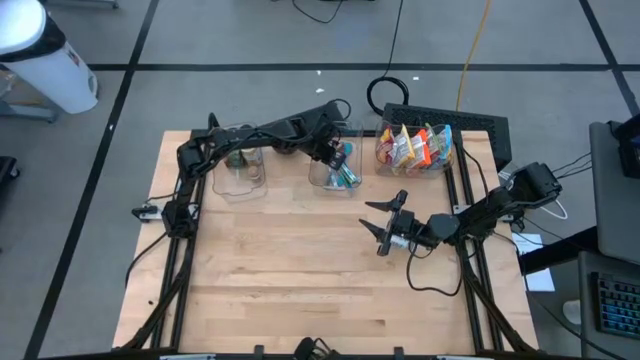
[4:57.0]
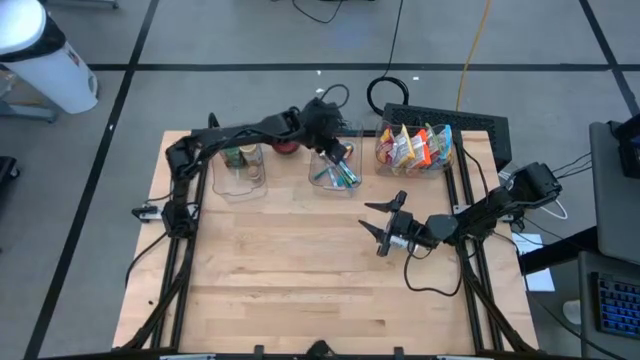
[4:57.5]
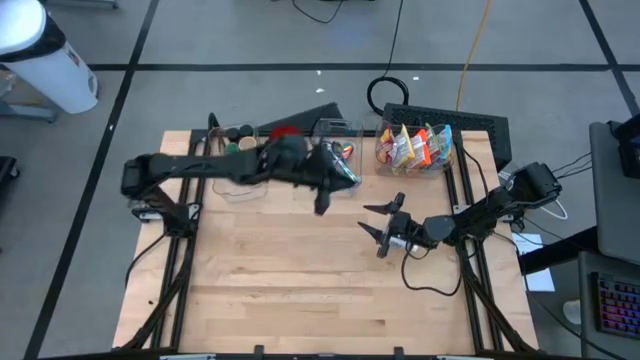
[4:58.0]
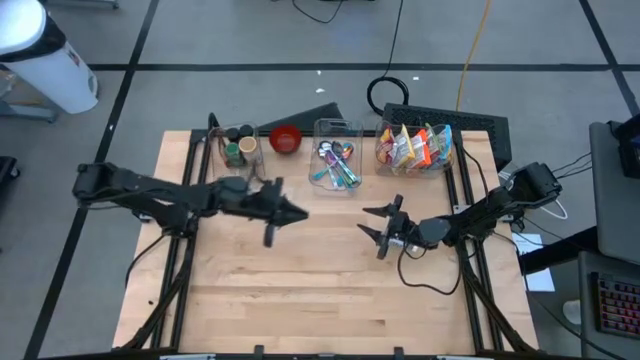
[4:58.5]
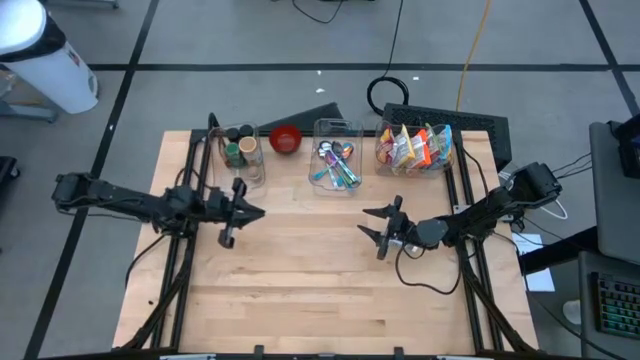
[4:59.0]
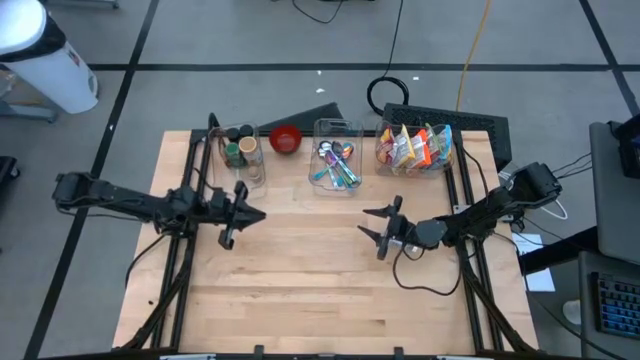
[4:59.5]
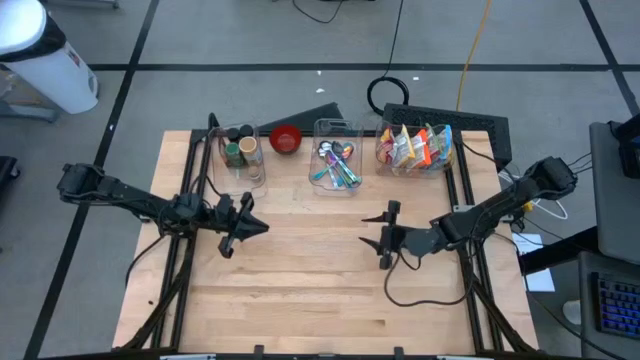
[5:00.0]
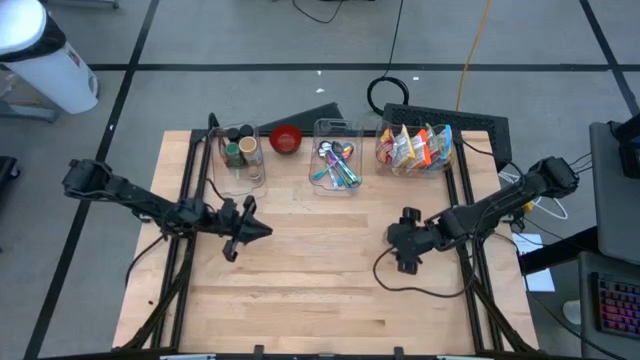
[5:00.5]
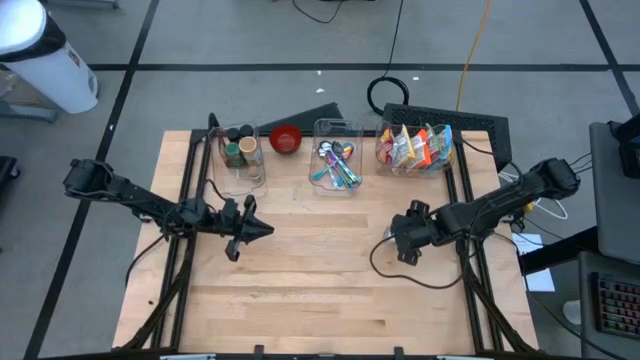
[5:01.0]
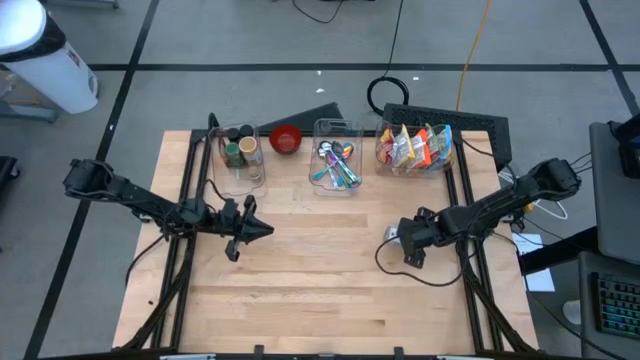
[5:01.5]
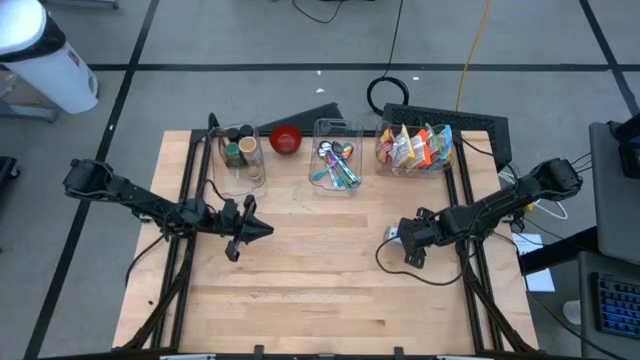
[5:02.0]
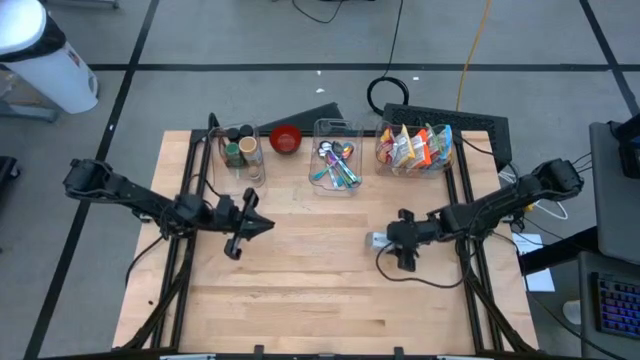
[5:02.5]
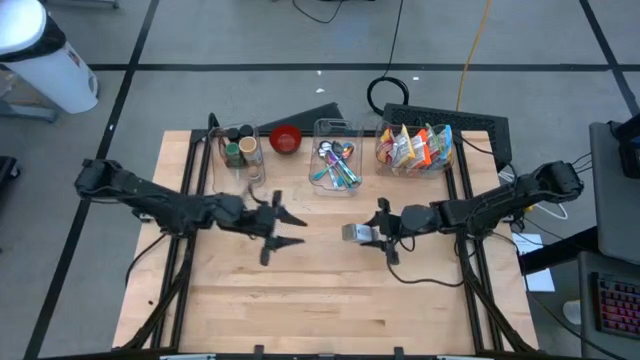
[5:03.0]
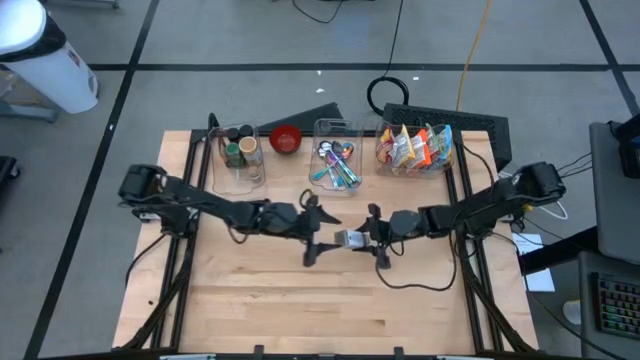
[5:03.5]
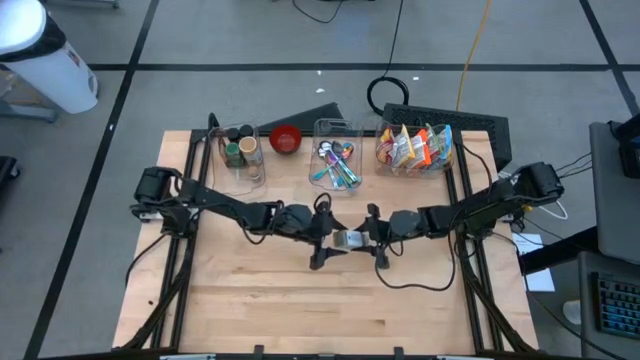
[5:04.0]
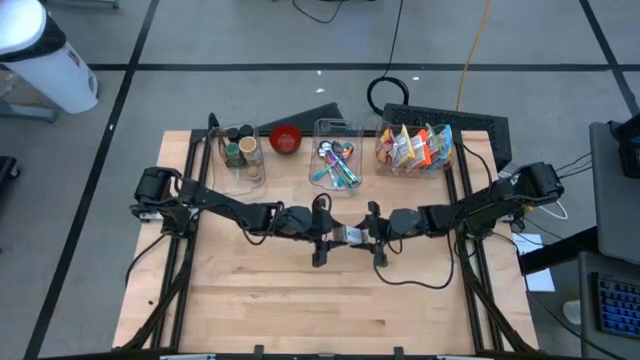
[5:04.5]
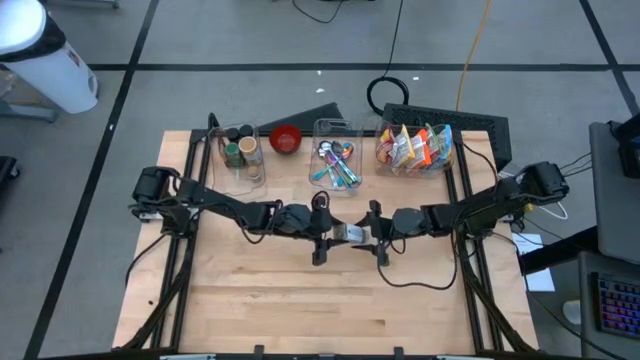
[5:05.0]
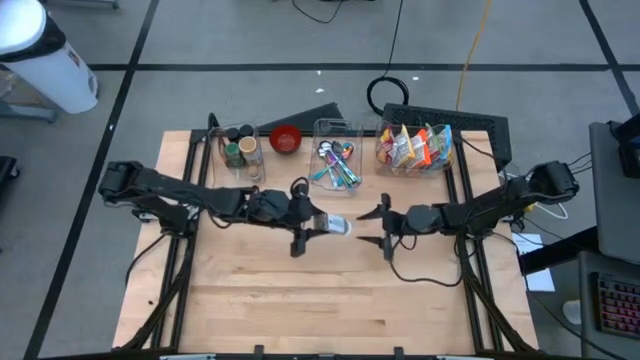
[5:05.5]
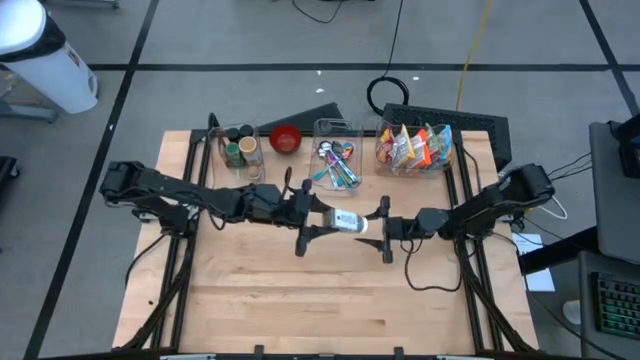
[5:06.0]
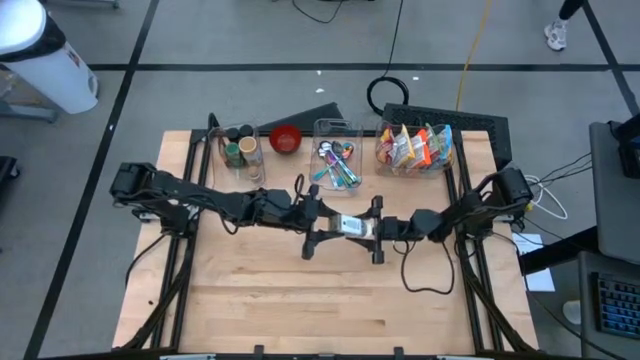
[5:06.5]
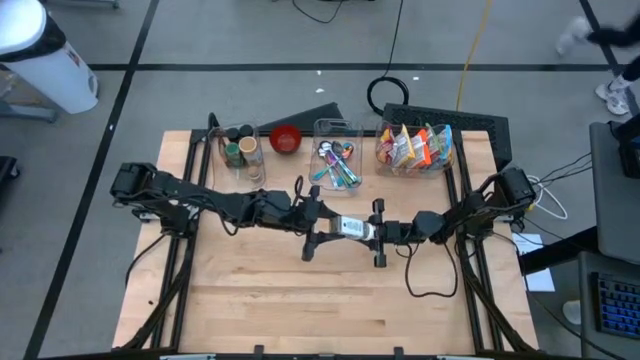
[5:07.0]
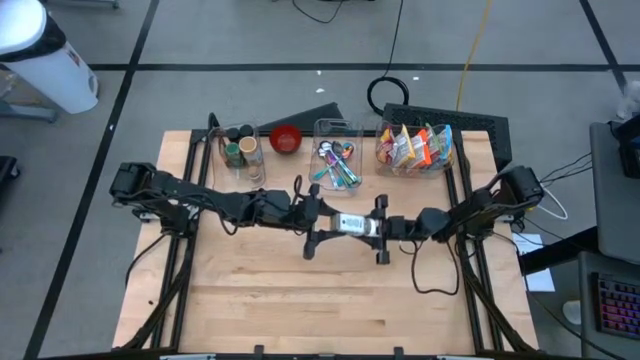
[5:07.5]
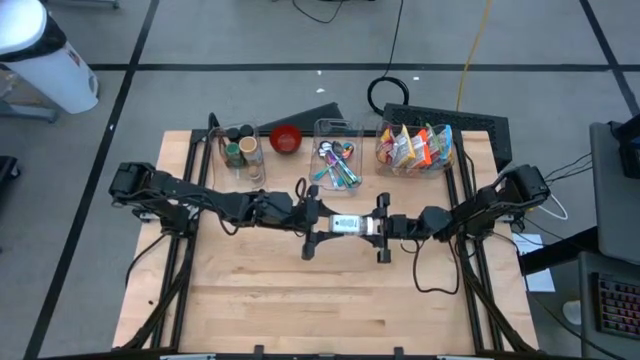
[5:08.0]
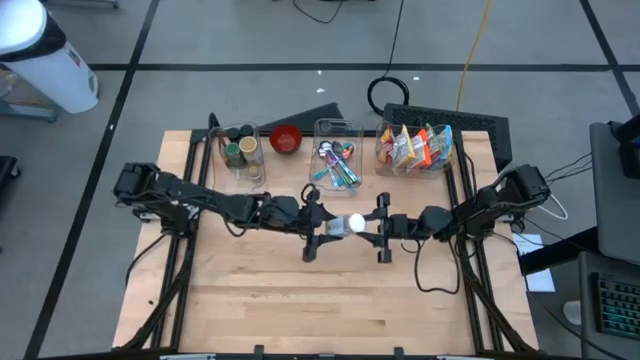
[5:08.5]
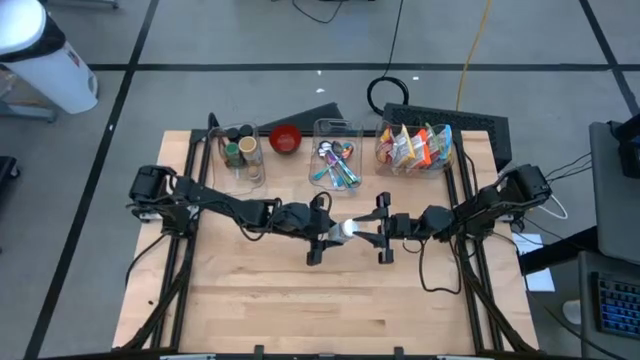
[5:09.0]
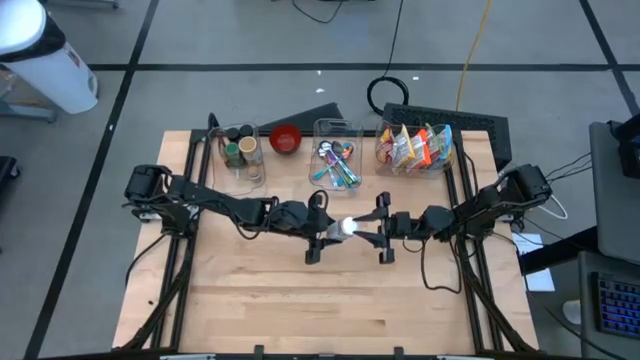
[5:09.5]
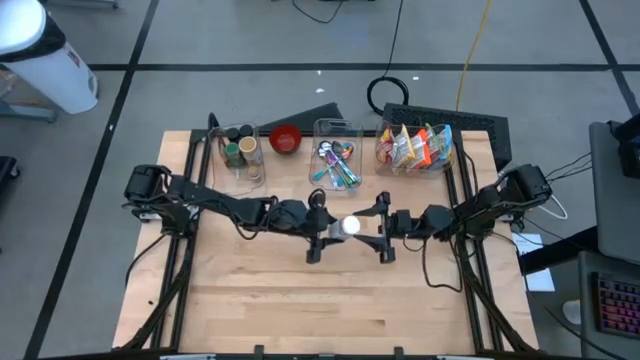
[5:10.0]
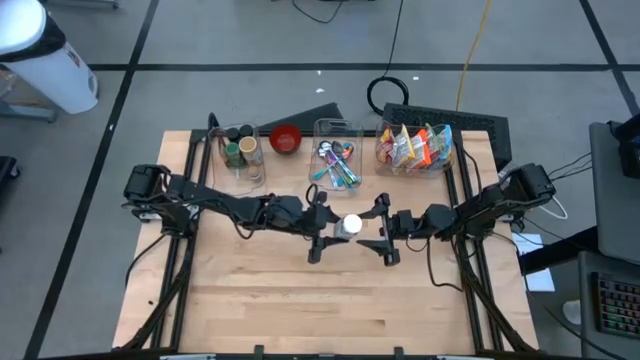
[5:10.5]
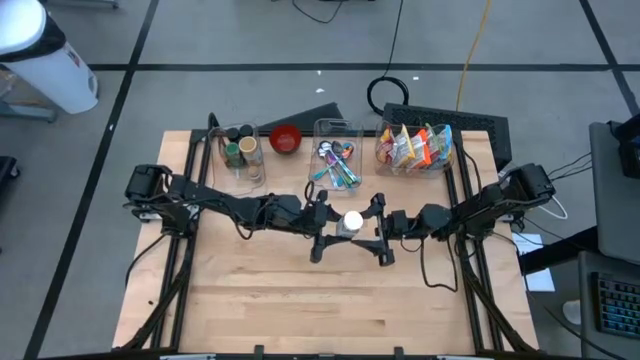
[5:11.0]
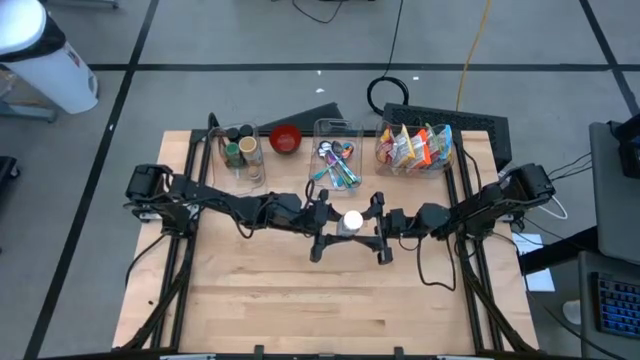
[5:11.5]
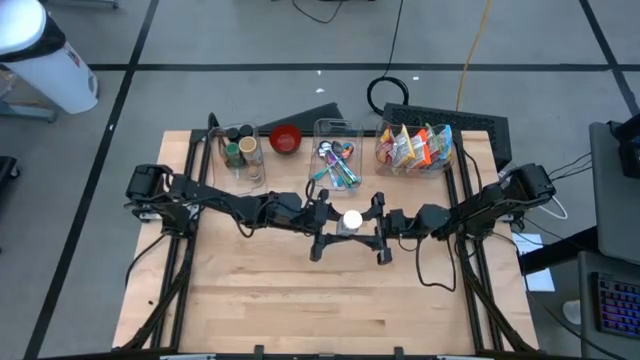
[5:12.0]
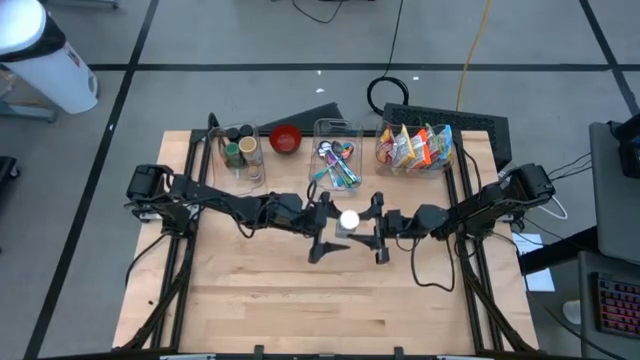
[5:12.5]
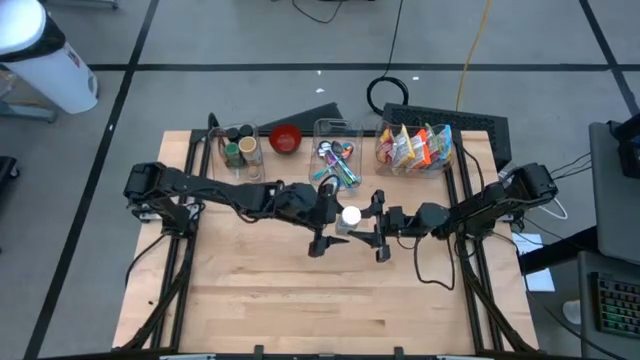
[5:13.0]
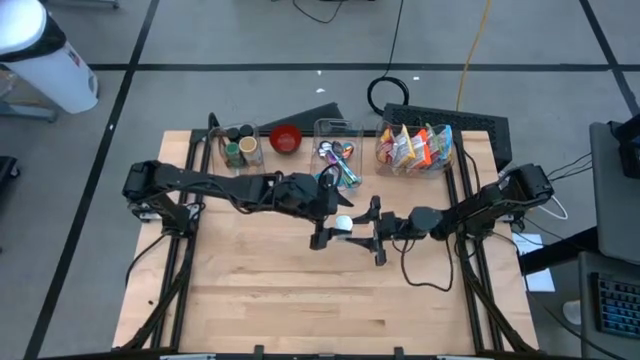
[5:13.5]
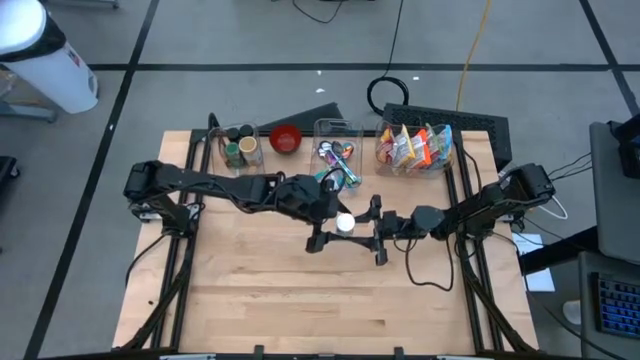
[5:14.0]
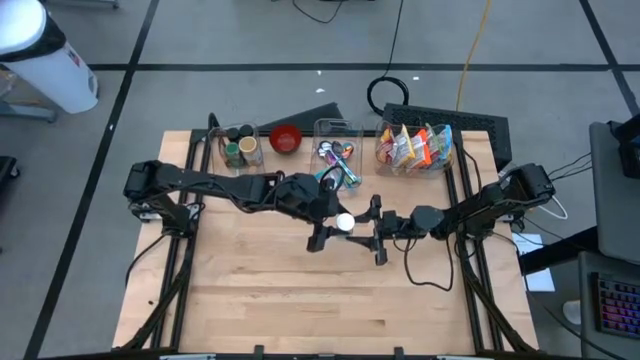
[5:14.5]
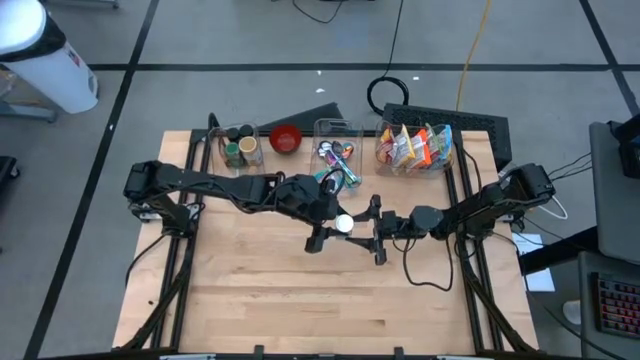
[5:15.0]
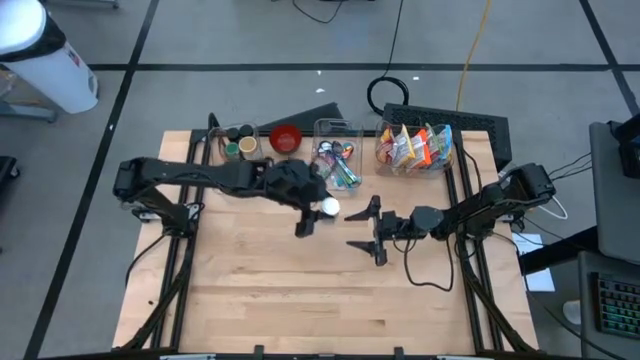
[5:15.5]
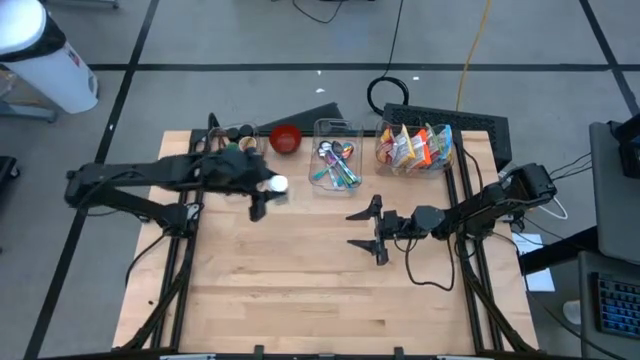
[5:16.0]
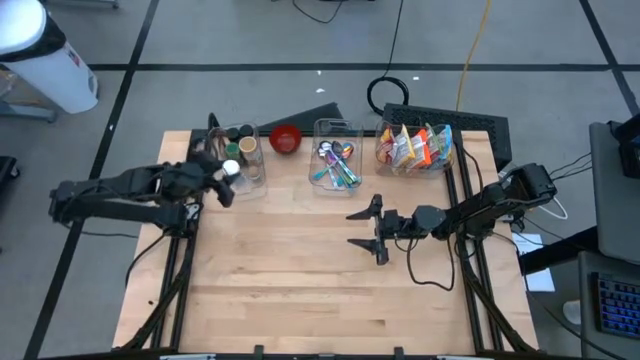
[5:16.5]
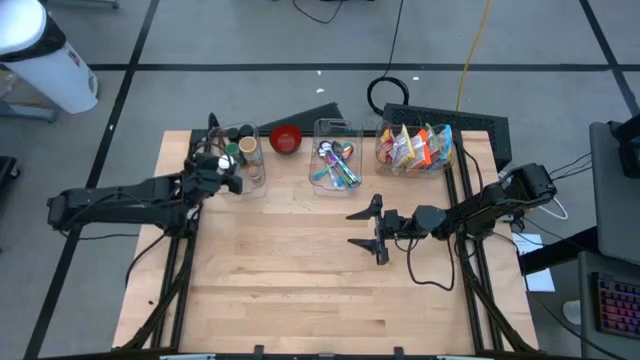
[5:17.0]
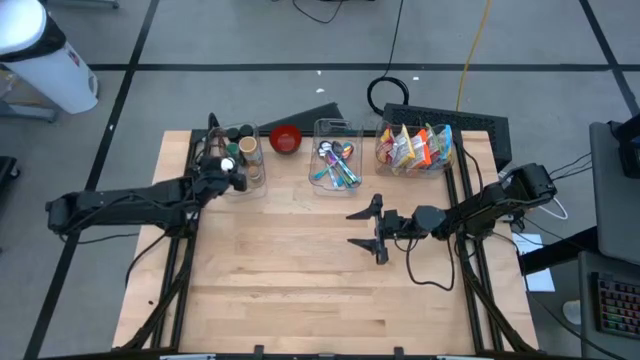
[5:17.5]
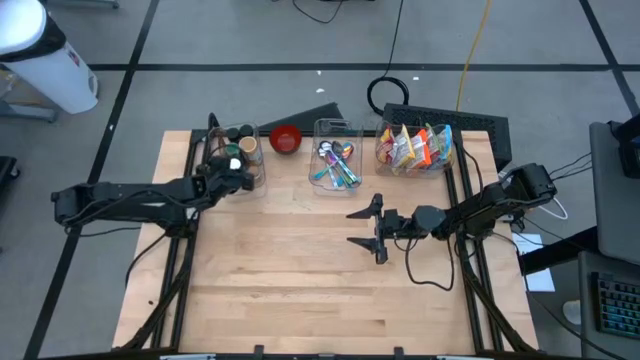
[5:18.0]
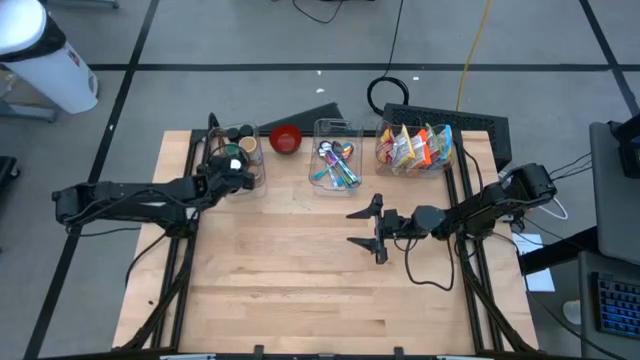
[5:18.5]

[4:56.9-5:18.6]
Task: Pick & Place Food Item
Put the white seasoning bottle into the left transparent bin
